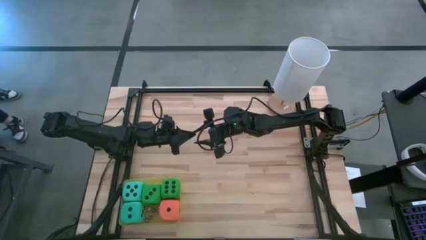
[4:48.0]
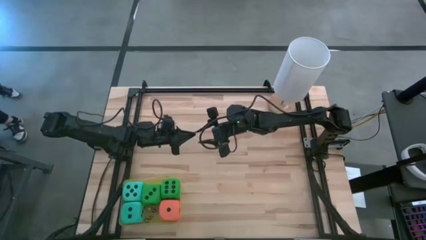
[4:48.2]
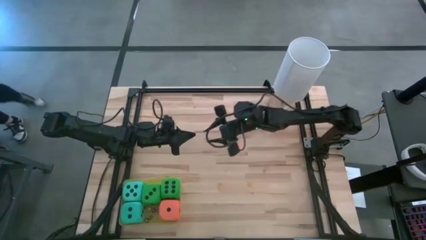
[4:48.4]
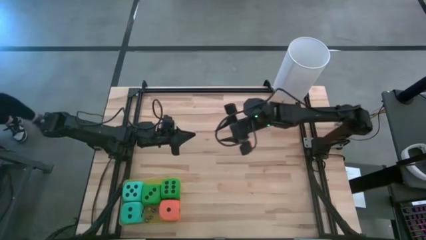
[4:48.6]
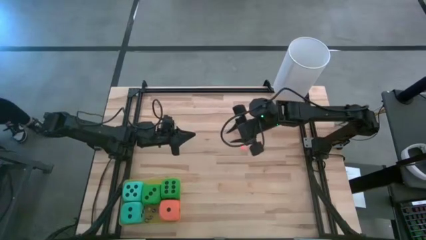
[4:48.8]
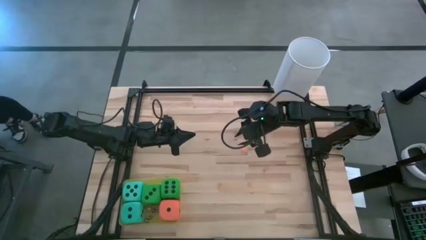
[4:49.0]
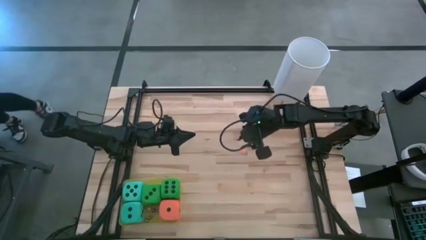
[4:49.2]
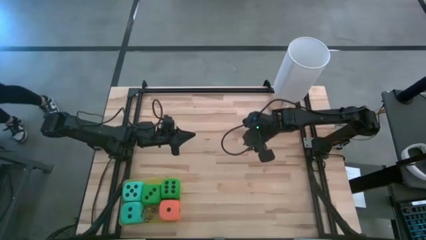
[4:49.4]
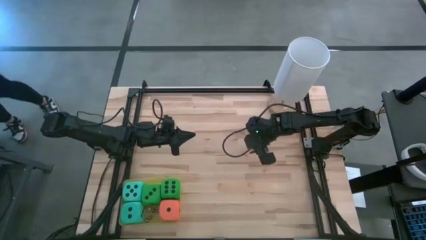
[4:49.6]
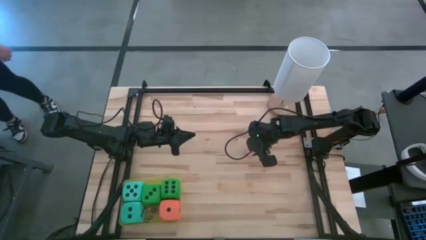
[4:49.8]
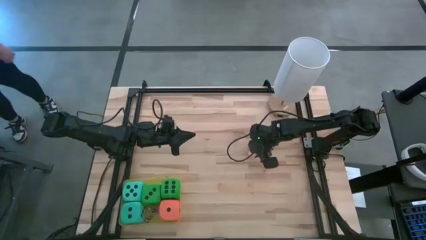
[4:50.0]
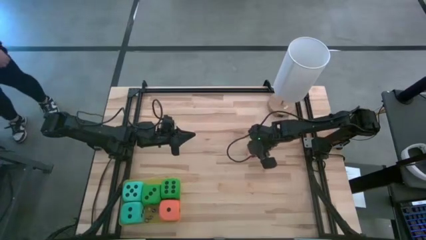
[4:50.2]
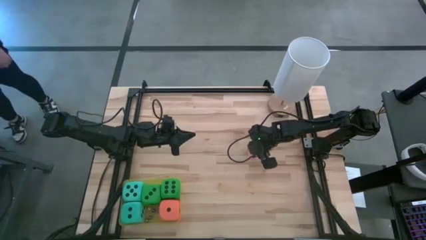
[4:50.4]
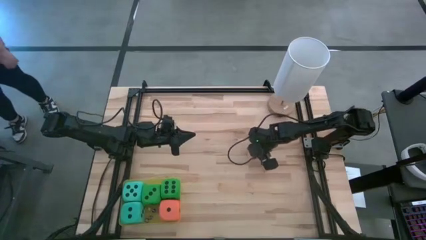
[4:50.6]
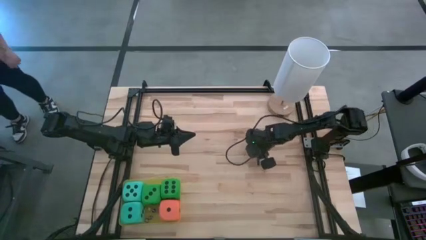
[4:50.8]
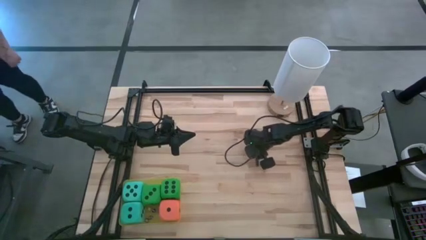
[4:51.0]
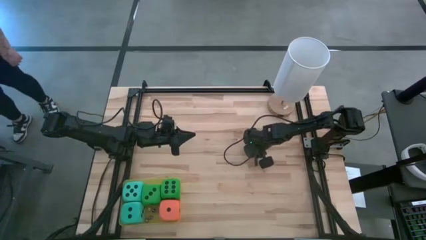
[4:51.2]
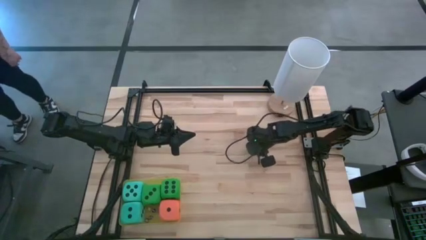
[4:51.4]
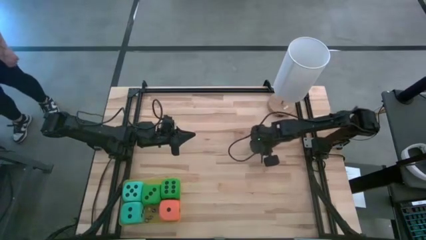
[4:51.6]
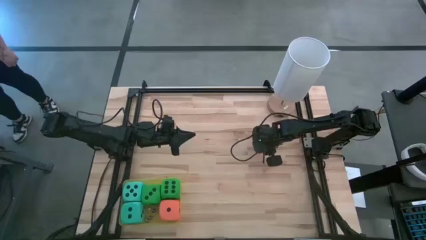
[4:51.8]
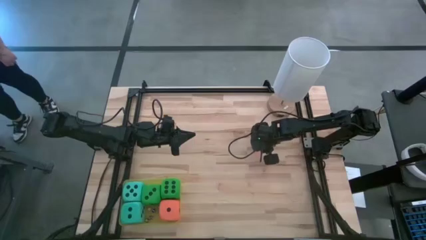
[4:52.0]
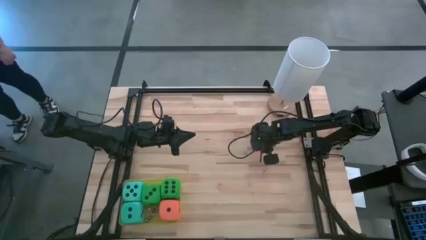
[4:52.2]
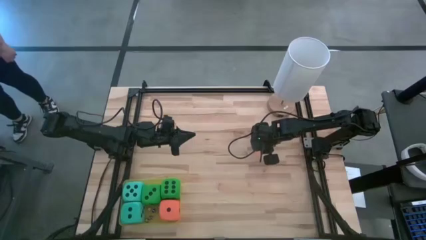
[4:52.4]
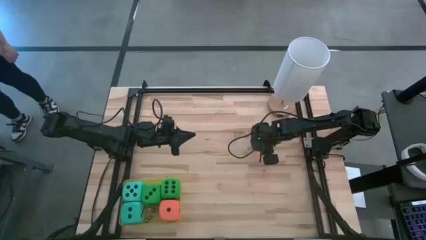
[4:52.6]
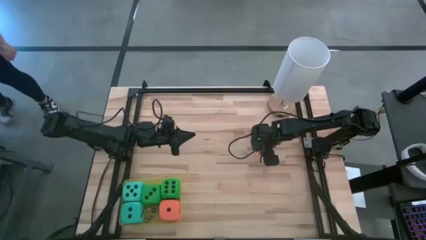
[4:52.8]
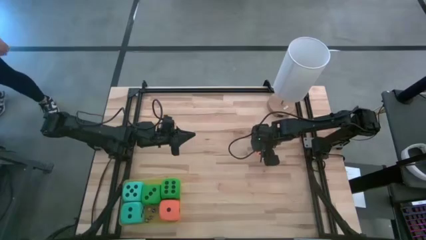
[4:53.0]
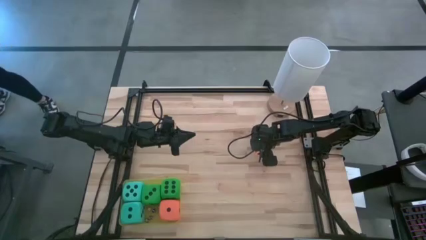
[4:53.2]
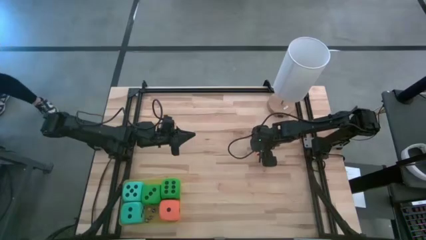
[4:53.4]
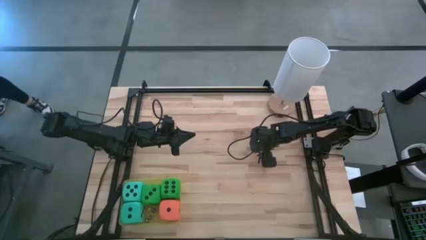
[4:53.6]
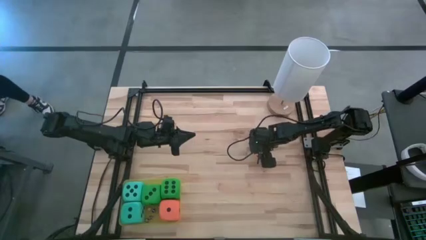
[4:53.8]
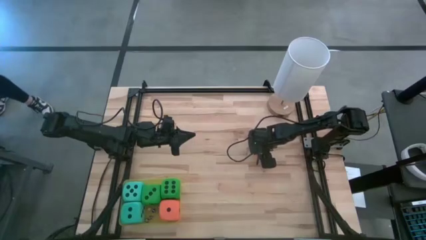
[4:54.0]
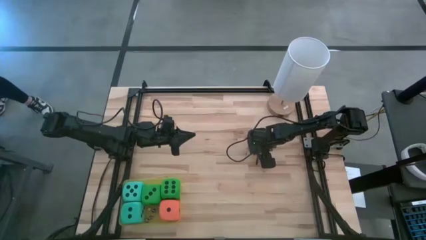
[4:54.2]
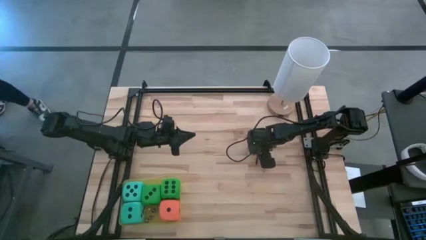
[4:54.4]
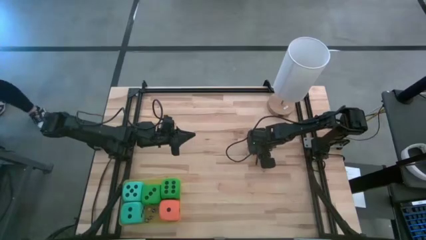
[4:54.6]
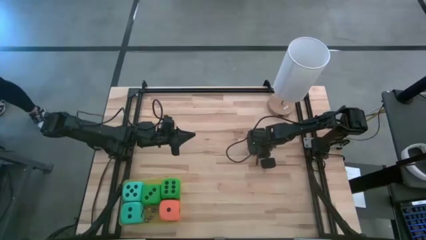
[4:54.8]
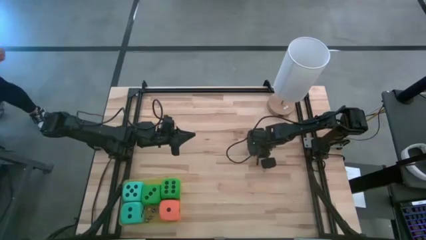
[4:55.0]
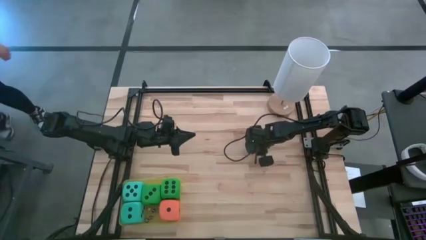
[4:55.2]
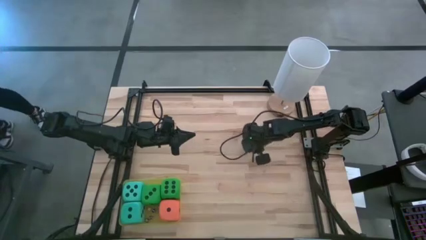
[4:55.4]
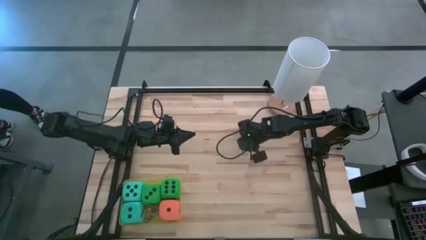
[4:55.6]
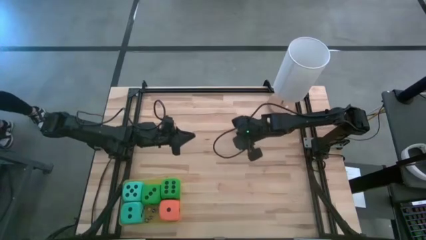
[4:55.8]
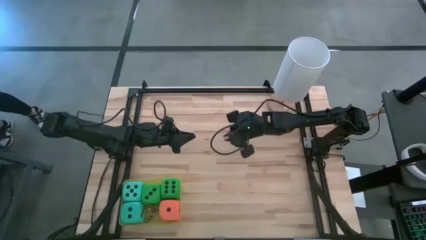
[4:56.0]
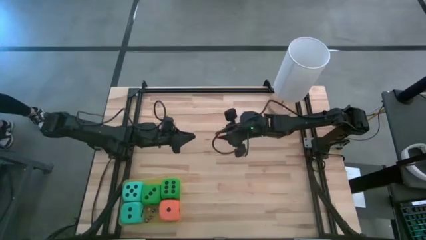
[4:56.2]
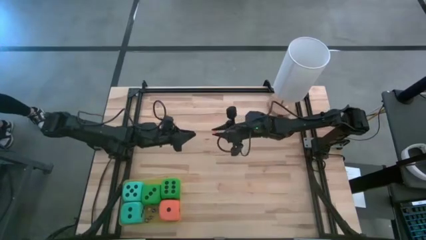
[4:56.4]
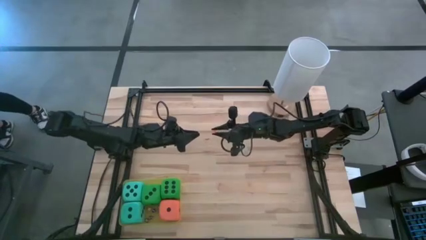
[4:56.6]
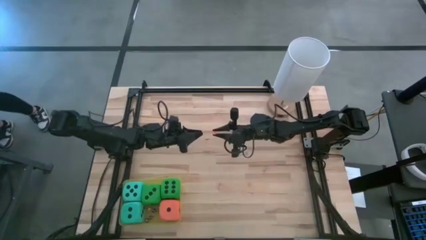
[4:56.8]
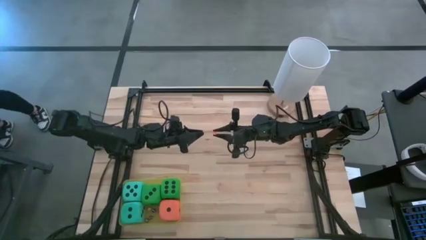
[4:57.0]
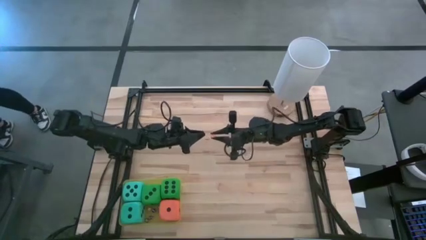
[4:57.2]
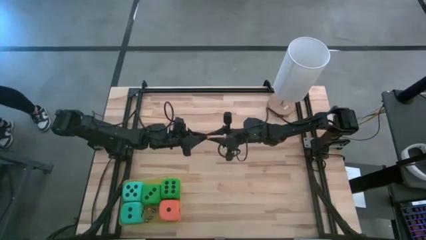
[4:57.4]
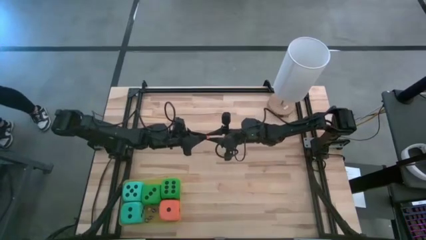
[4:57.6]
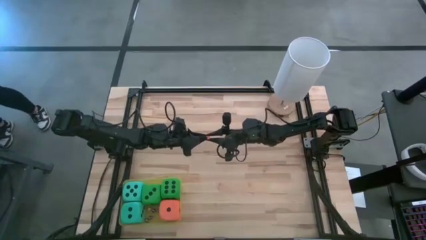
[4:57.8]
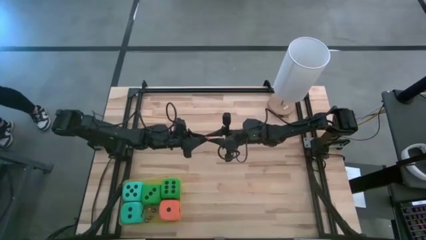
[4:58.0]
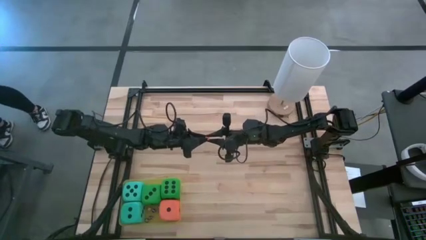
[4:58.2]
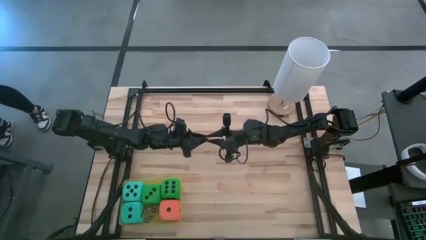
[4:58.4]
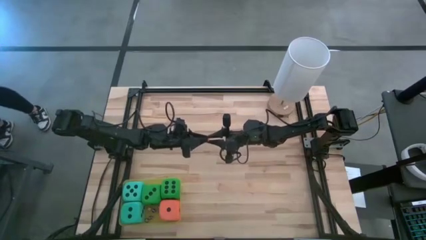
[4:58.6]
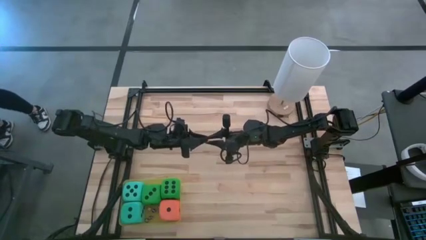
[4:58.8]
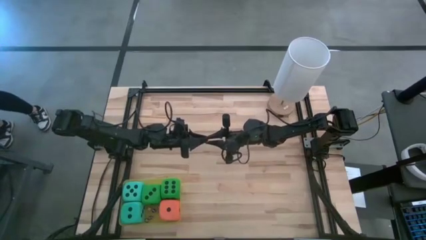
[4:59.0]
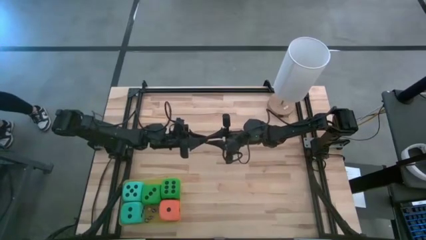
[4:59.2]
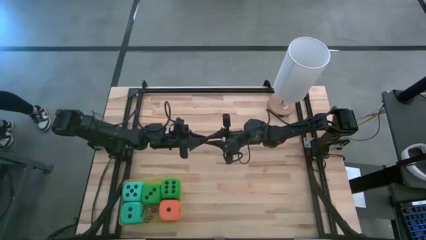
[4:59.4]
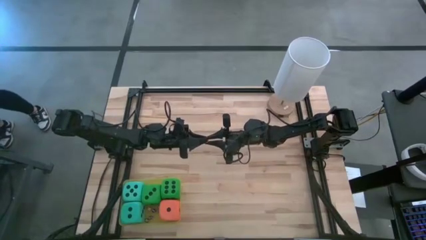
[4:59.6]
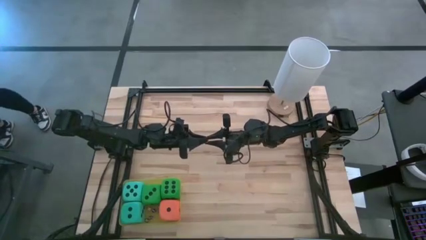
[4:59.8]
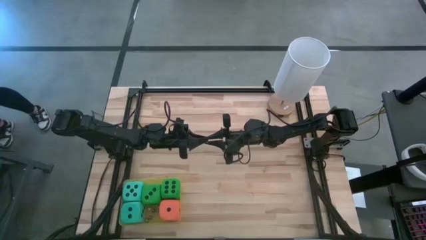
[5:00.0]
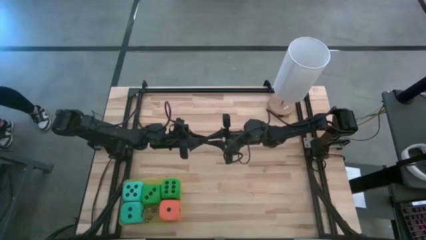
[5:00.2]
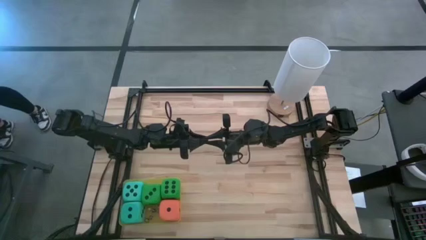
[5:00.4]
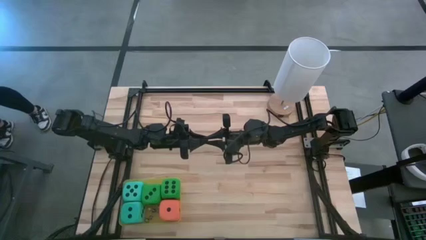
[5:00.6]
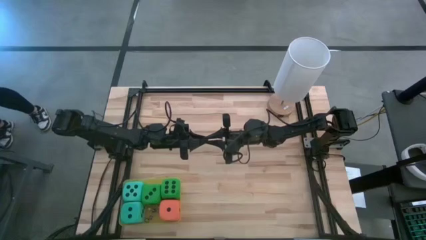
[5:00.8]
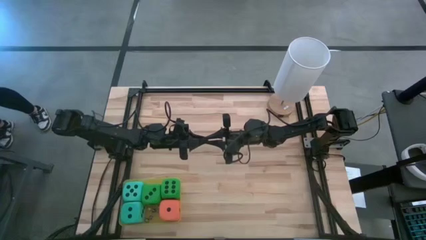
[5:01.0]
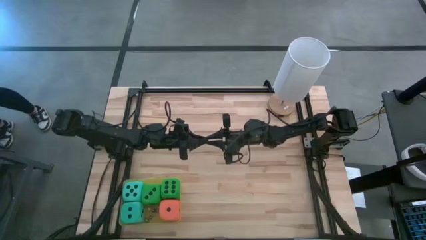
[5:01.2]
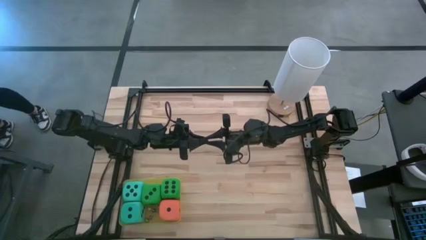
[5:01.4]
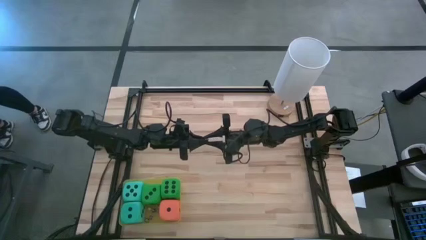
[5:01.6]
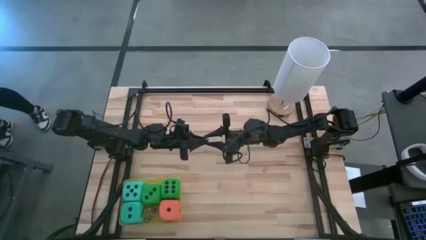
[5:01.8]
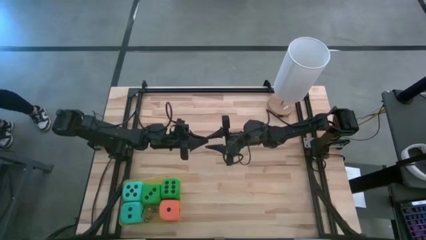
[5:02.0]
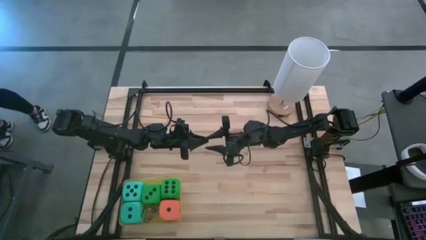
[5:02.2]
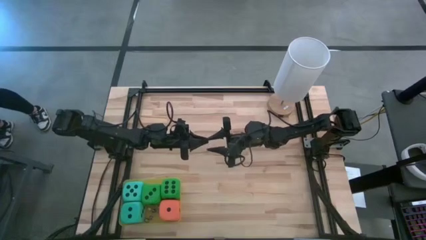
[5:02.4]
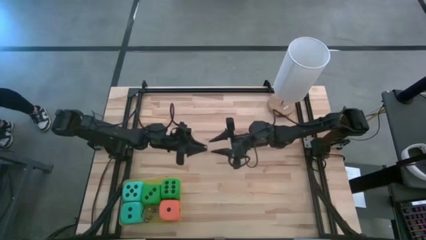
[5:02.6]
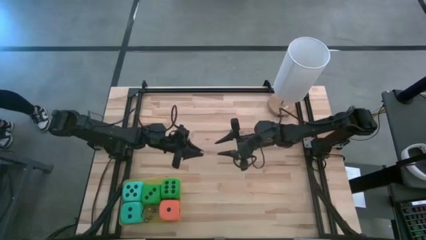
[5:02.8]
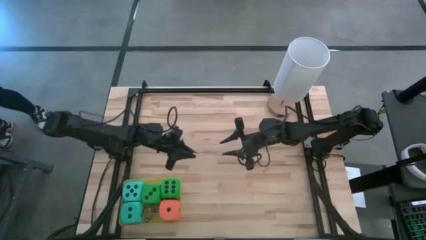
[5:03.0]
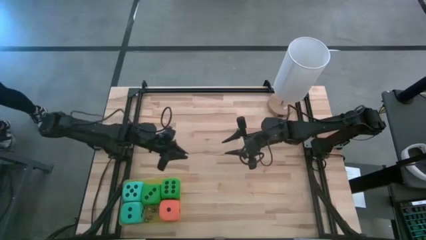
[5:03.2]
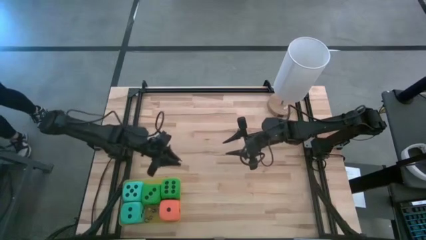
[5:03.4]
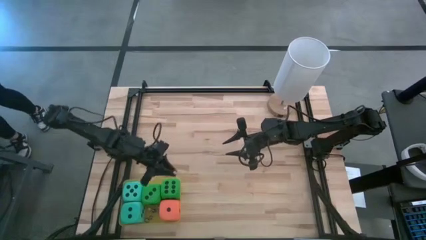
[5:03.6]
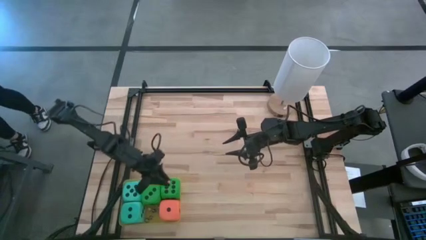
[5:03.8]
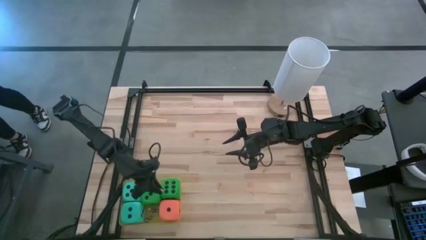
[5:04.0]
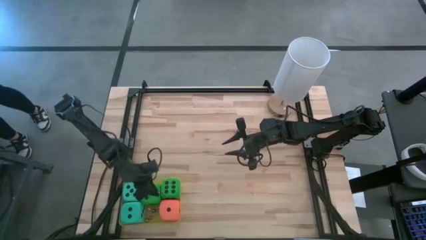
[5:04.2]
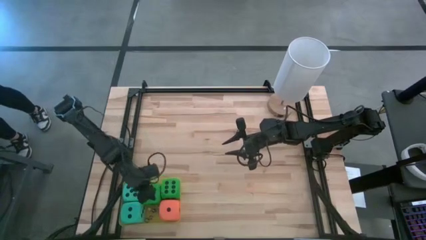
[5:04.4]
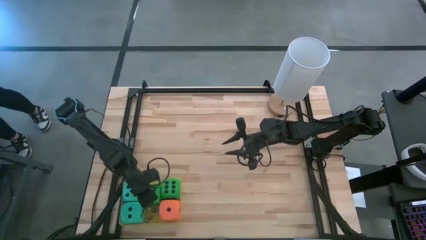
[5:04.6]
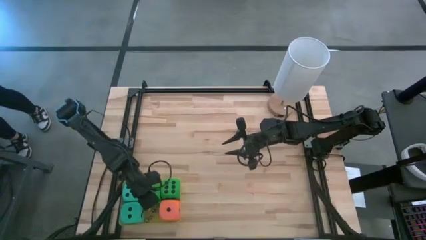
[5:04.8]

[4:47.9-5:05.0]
Task: Pick & Place Dice
Put the orange dice into the yellow bin
